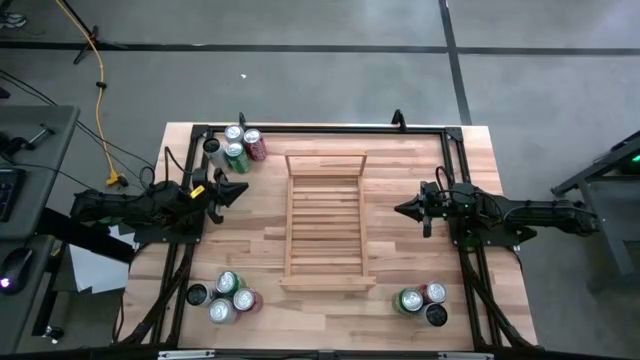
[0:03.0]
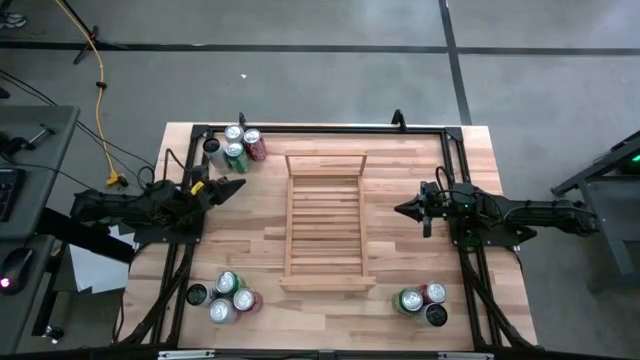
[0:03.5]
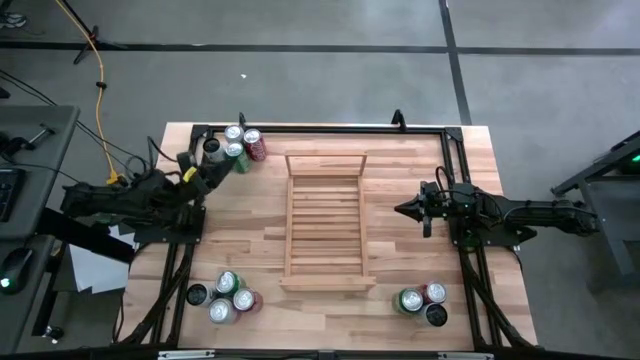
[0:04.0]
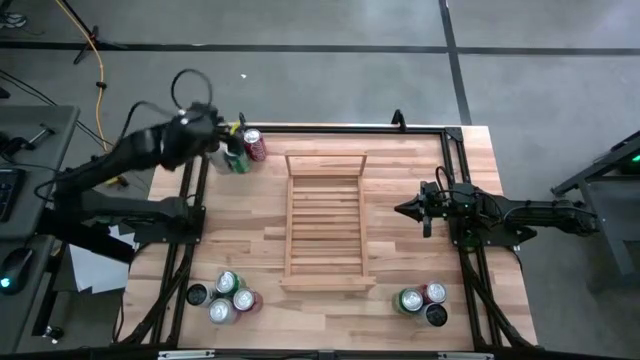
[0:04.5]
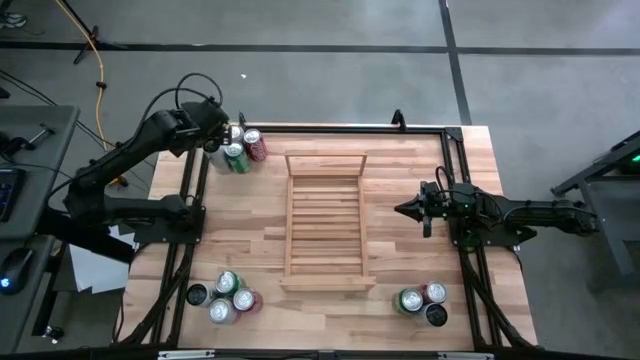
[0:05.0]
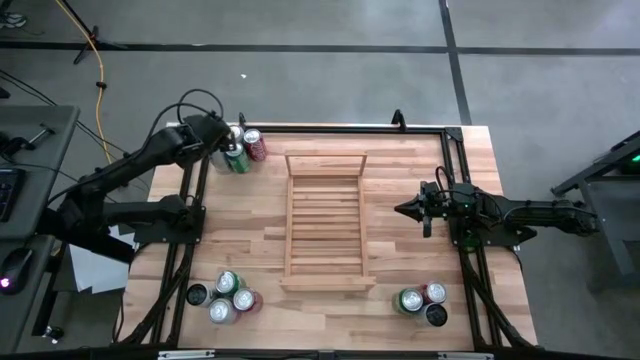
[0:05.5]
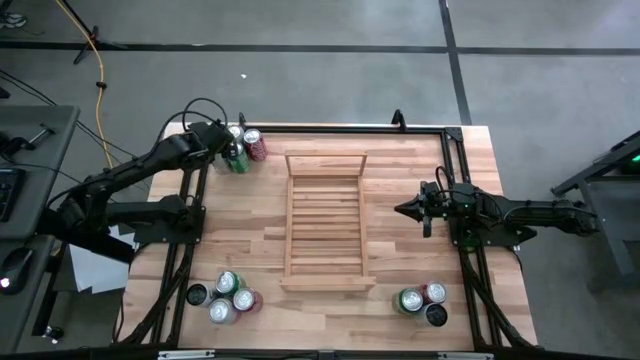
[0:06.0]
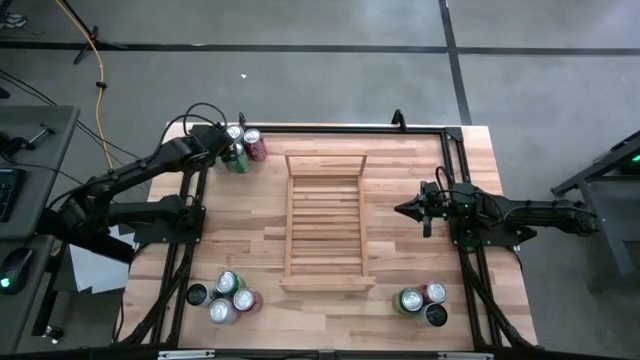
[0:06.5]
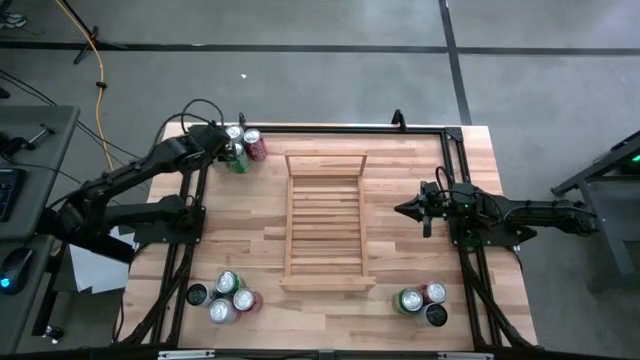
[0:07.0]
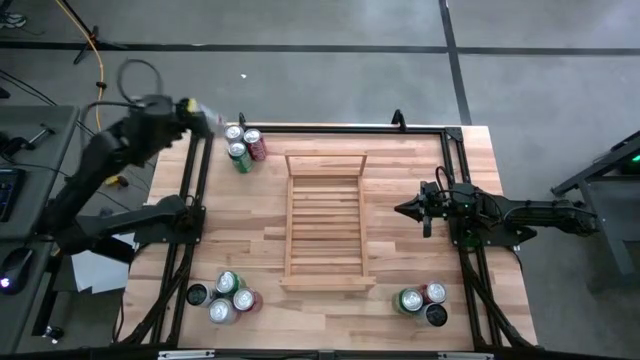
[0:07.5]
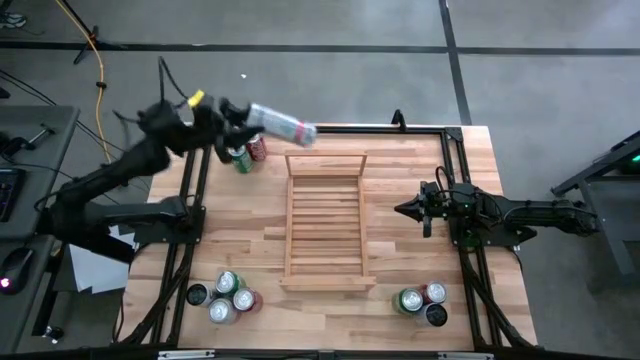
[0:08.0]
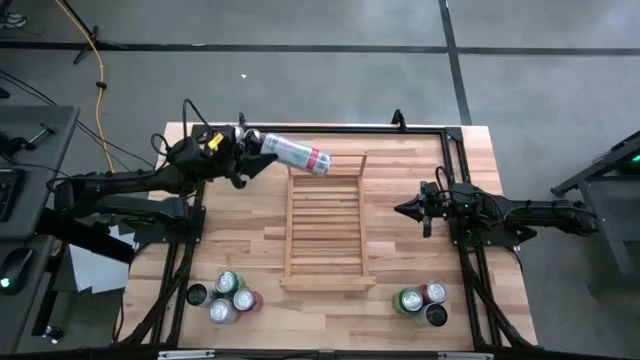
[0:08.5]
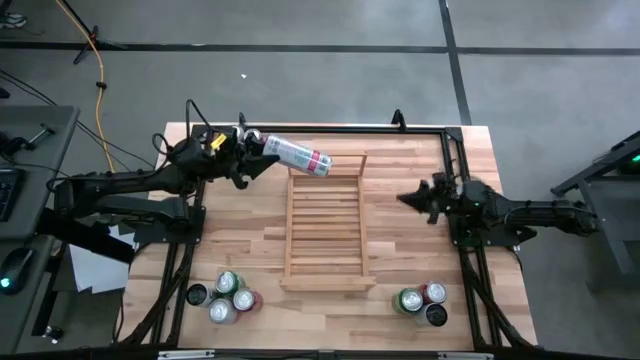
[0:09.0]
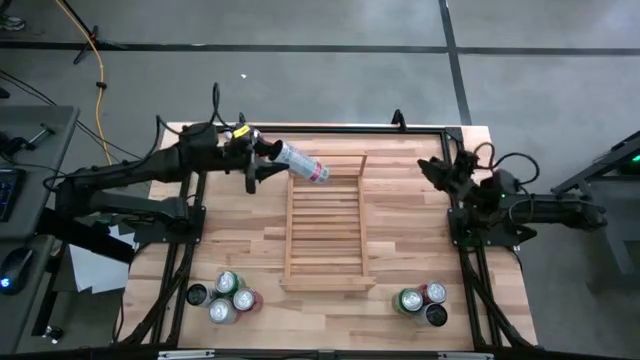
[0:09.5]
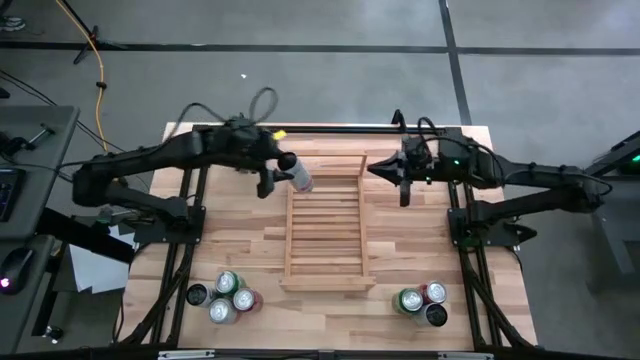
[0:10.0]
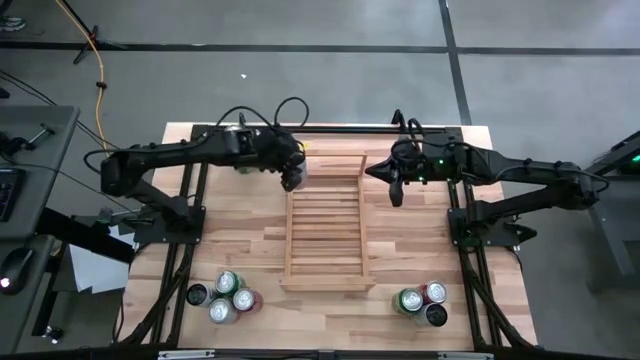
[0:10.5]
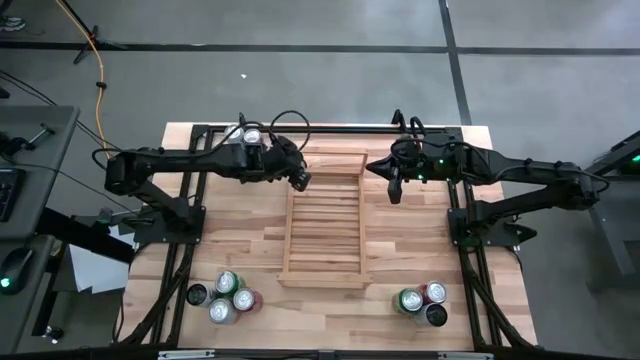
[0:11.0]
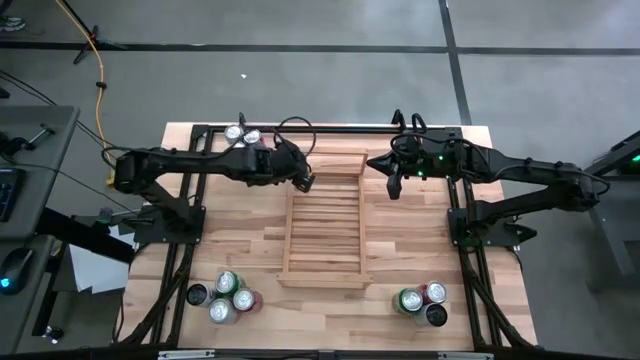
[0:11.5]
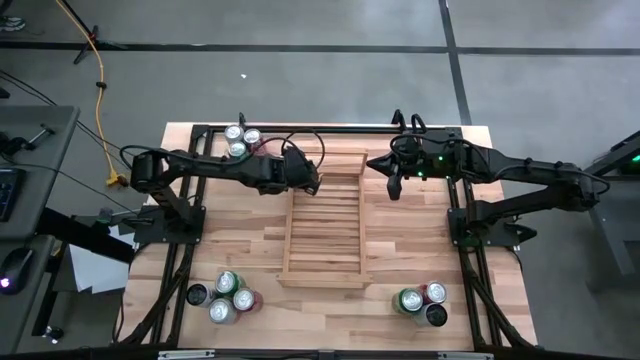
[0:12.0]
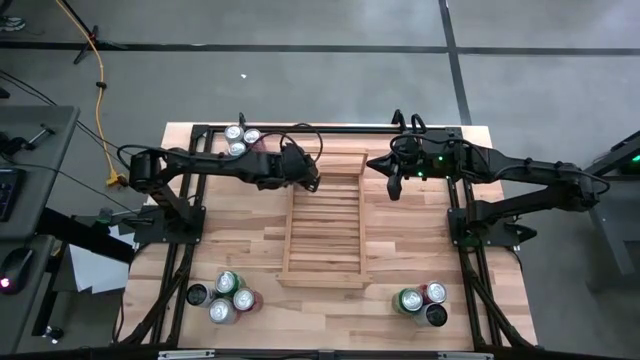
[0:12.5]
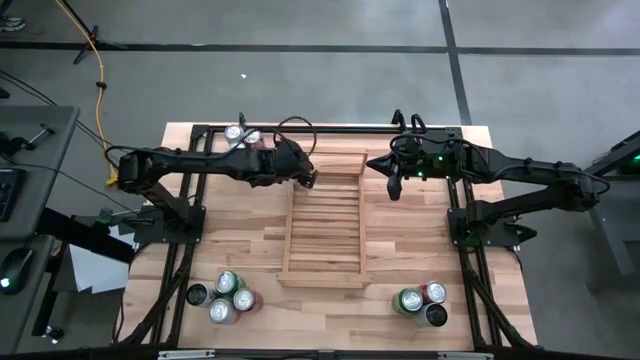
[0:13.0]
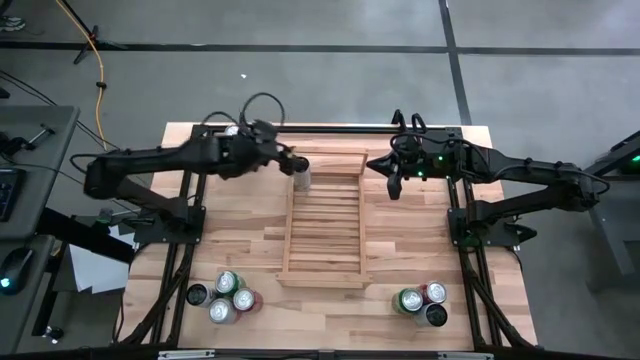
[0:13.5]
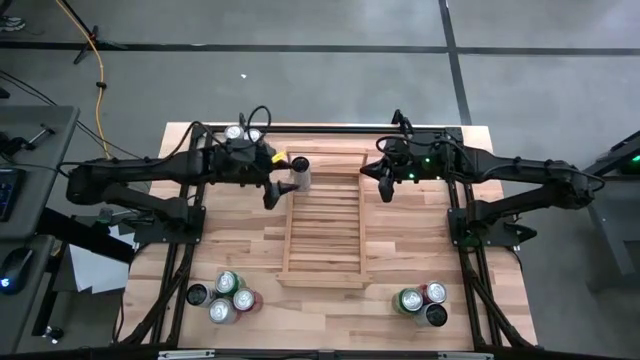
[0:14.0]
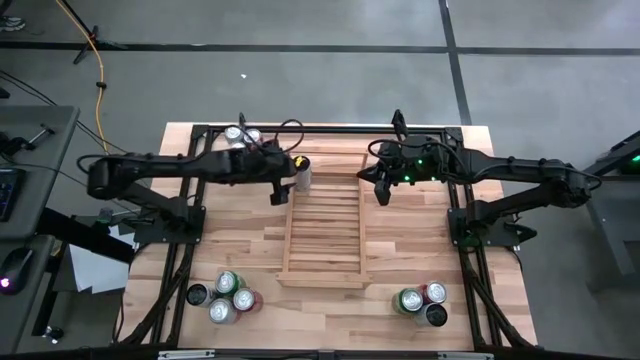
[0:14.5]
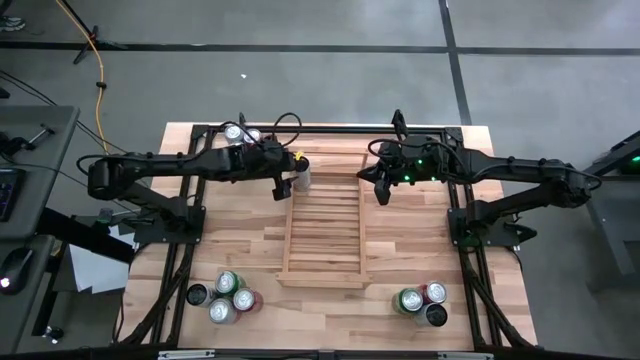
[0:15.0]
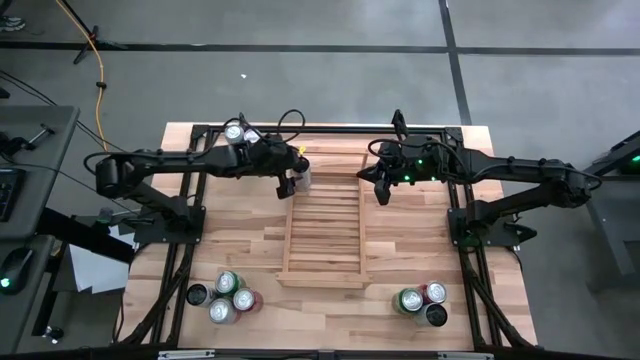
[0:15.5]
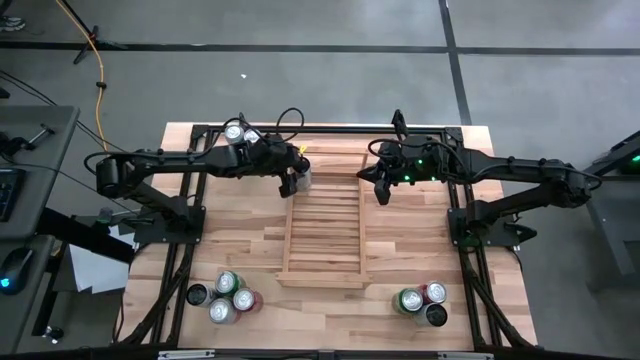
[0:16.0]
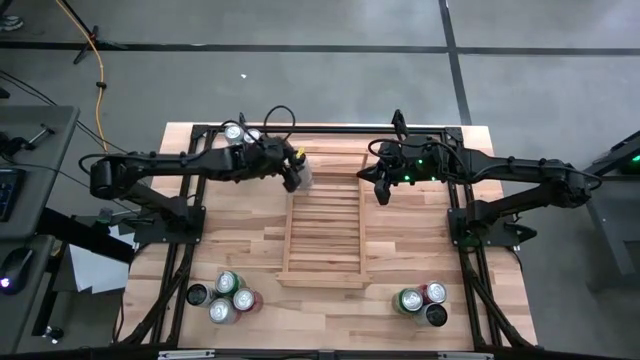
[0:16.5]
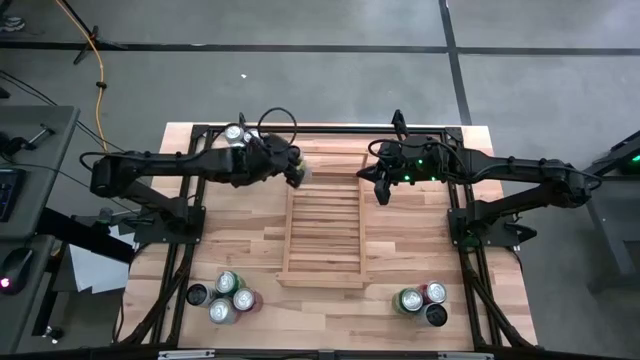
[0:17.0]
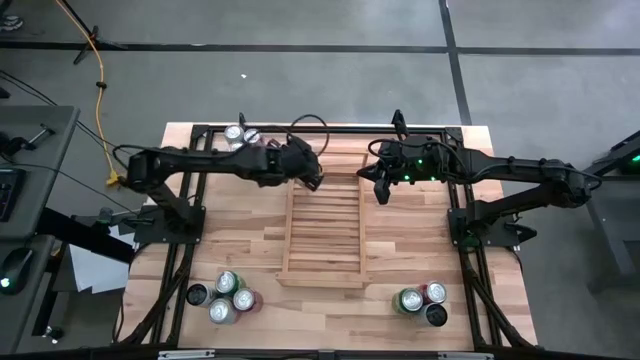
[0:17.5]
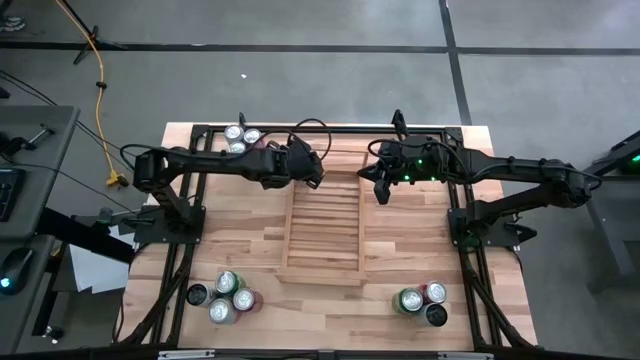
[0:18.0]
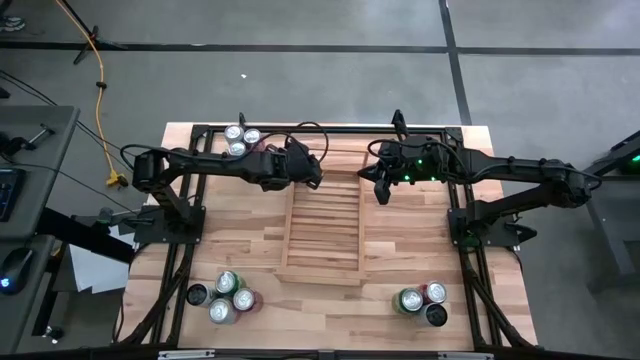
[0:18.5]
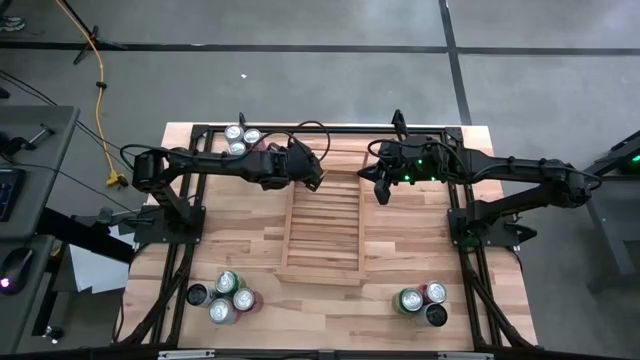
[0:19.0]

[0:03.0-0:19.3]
Task: Place canned beverage on shelf
Put the top left white and pink can on the shelf

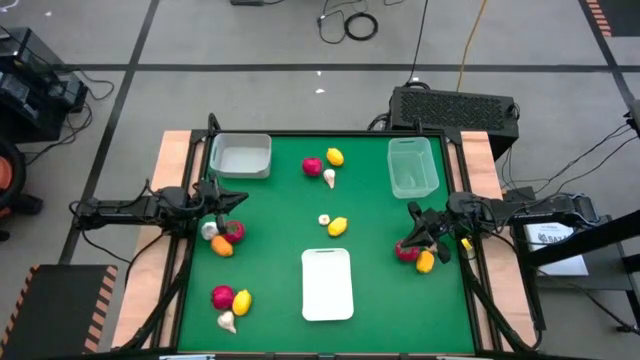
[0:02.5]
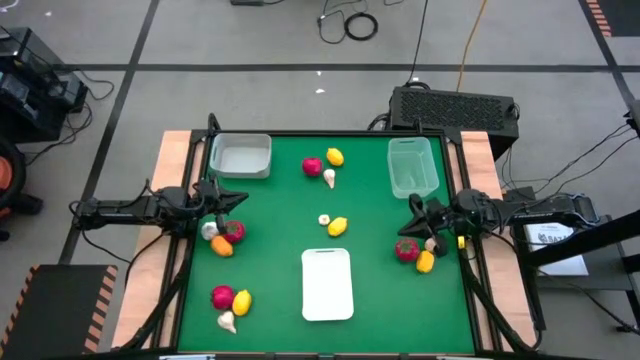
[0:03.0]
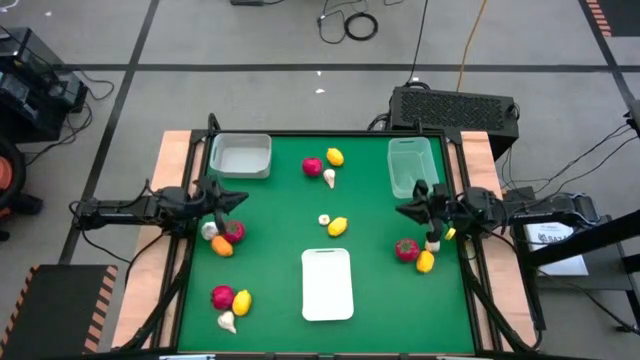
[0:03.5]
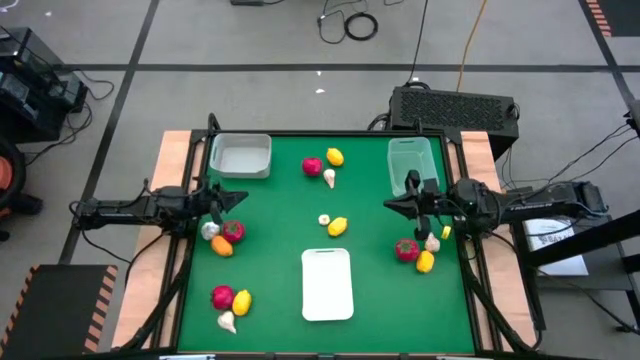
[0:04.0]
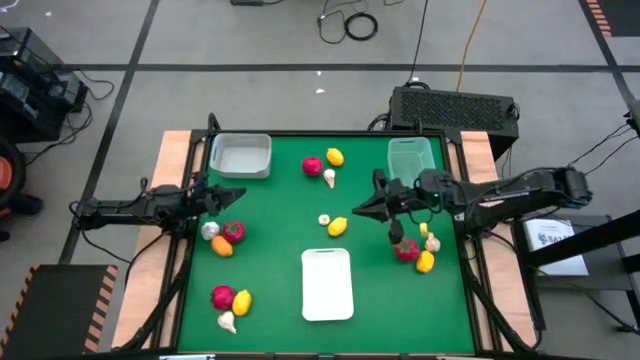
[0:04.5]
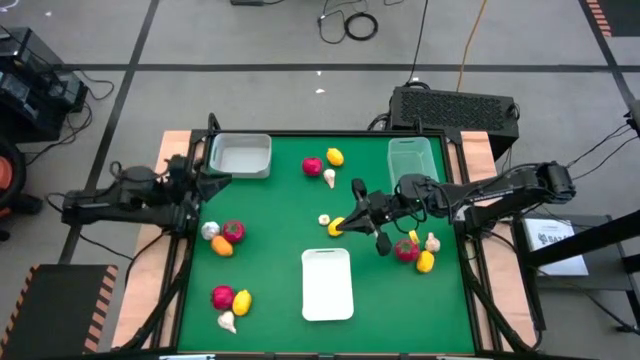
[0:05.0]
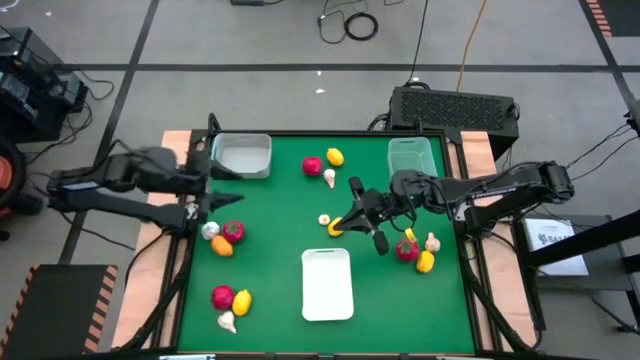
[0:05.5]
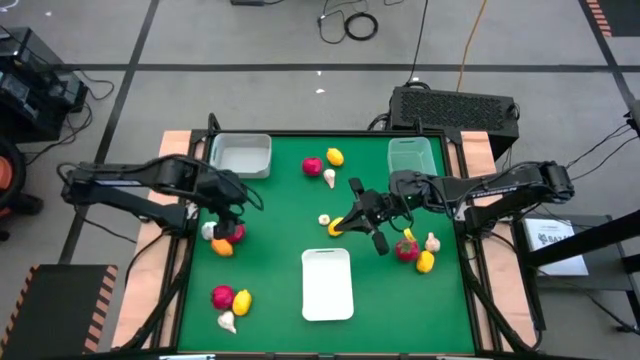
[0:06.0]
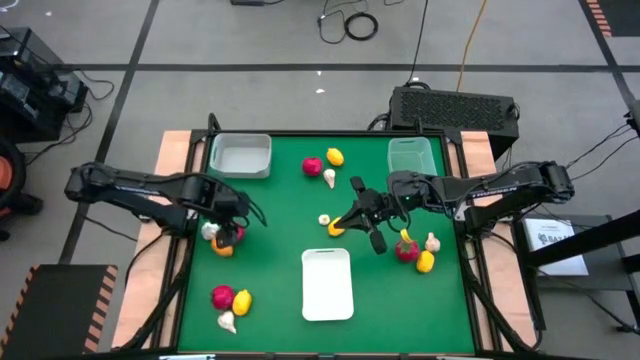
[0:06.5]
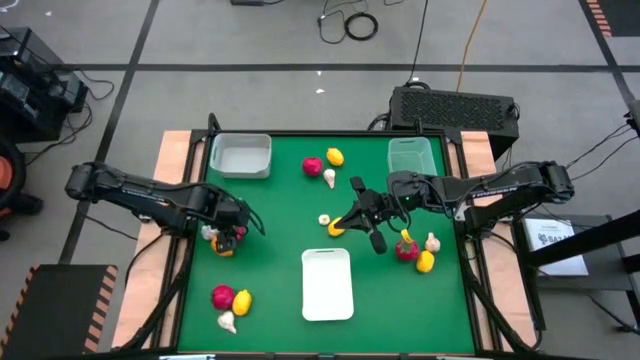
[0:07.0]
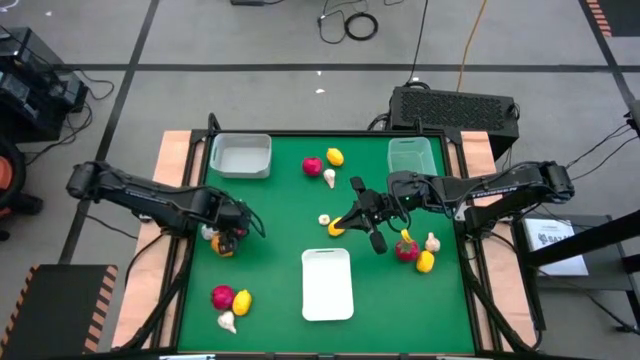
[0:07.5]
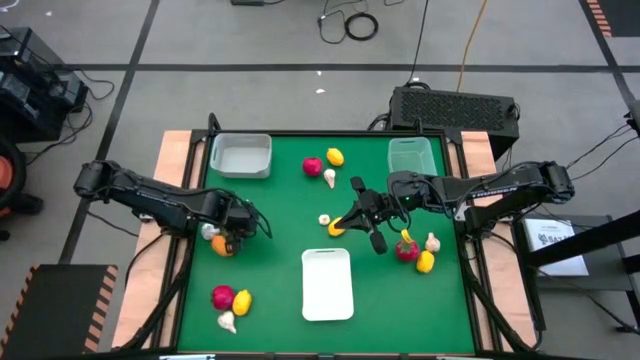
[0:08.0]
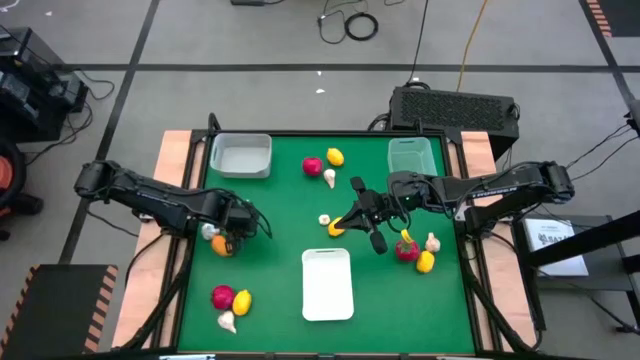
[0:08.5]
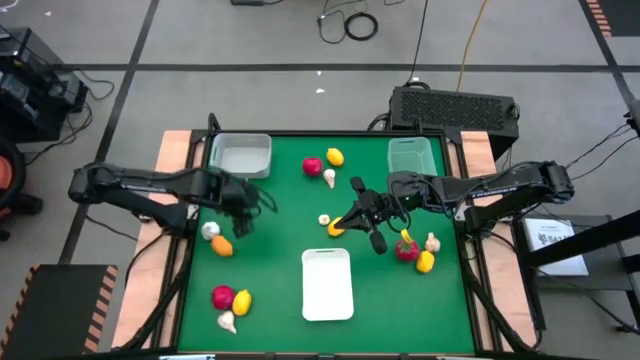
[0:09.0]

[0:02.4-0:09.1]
Task: Sort produce into baskets
Put the middle left tomato into the gray bin
